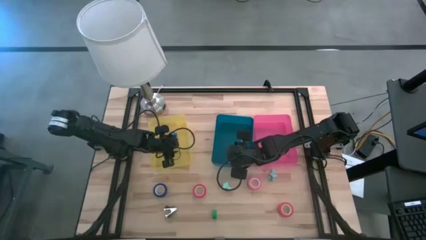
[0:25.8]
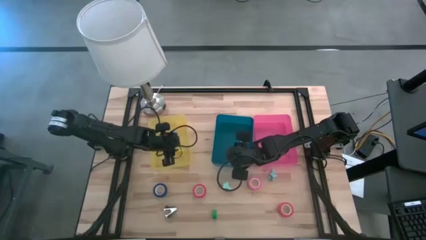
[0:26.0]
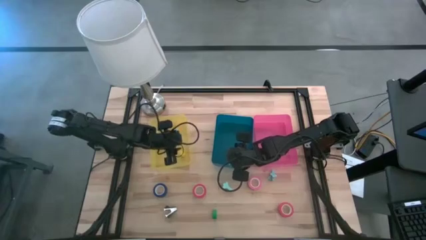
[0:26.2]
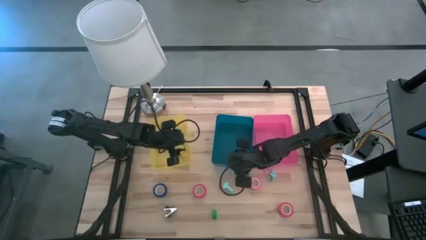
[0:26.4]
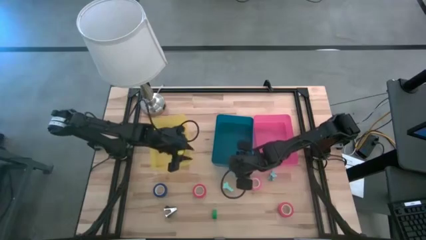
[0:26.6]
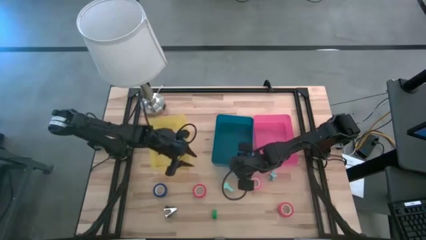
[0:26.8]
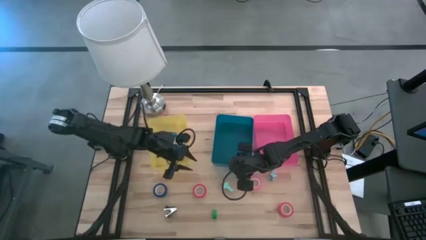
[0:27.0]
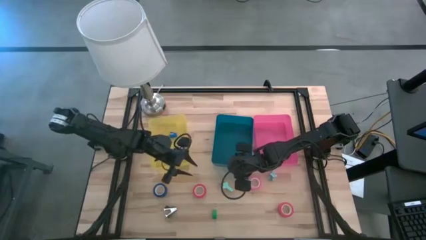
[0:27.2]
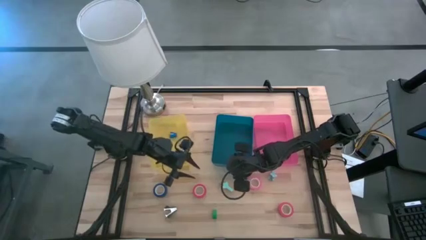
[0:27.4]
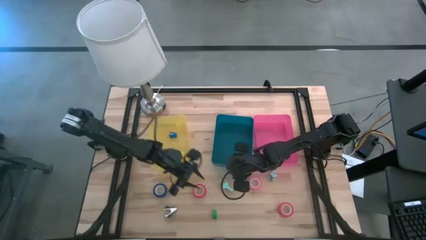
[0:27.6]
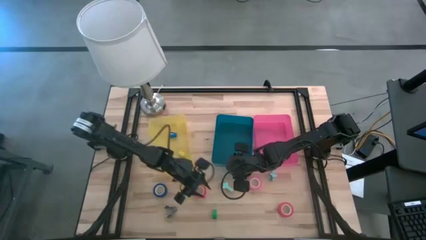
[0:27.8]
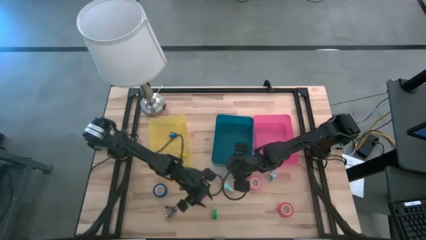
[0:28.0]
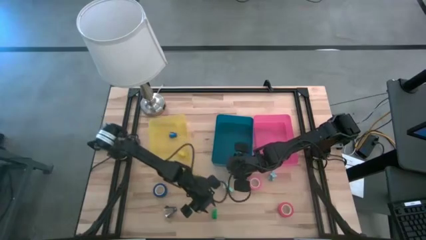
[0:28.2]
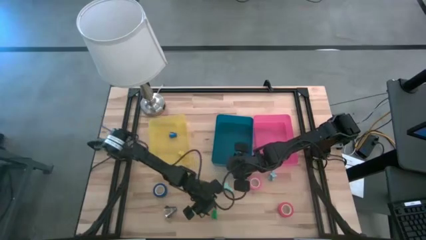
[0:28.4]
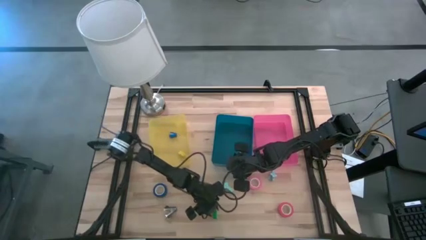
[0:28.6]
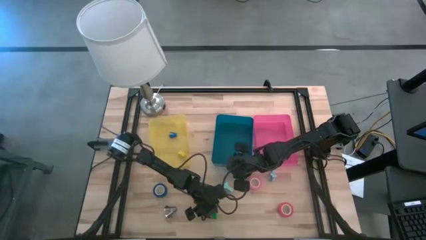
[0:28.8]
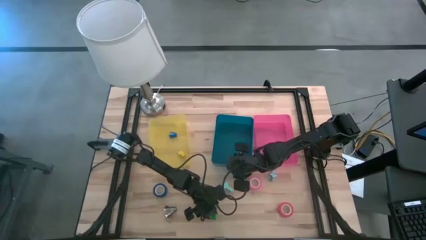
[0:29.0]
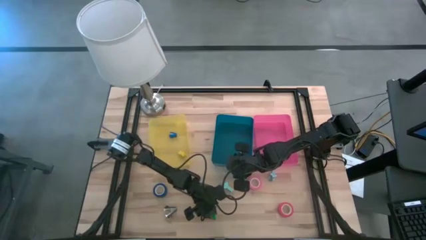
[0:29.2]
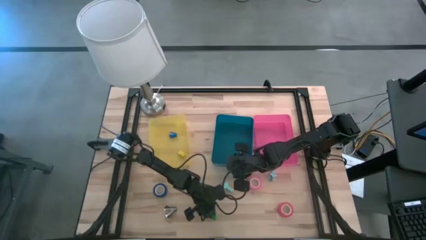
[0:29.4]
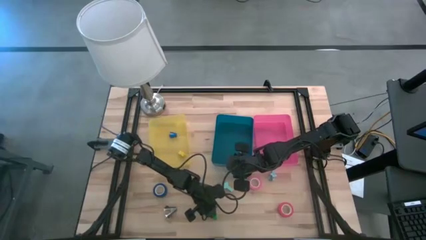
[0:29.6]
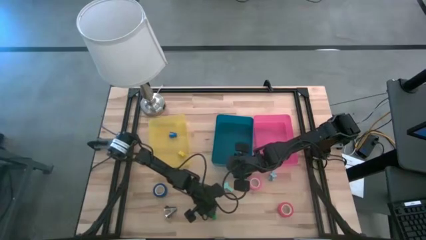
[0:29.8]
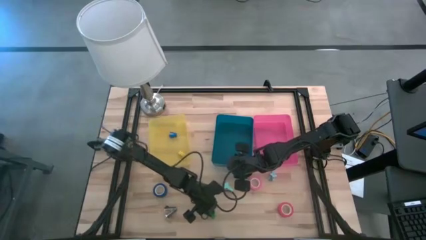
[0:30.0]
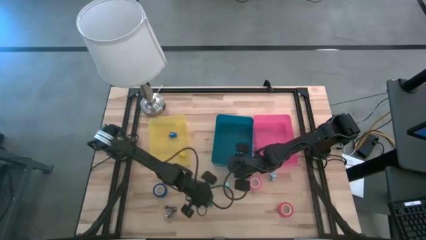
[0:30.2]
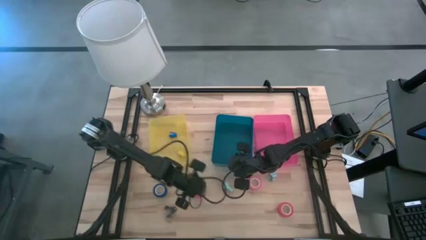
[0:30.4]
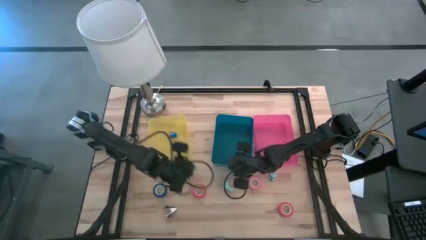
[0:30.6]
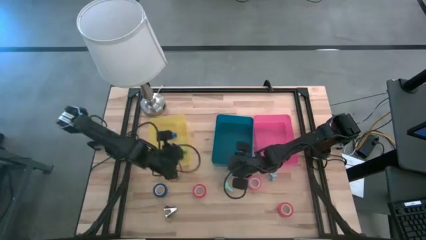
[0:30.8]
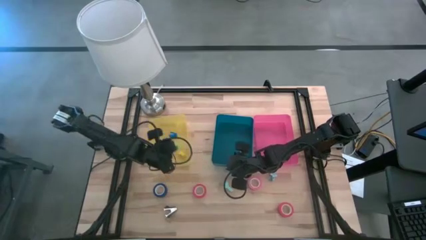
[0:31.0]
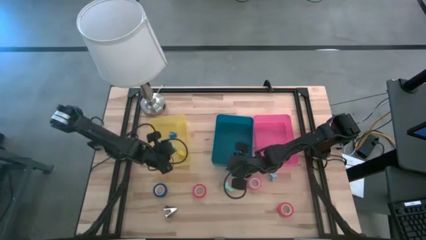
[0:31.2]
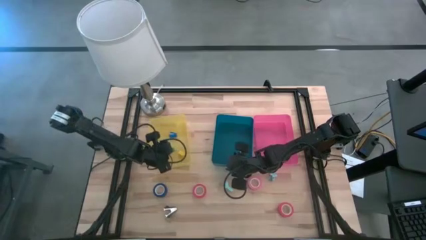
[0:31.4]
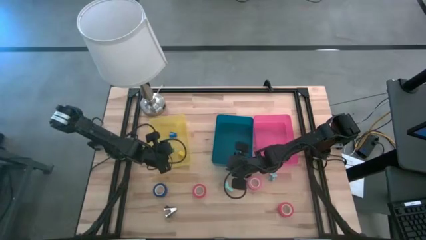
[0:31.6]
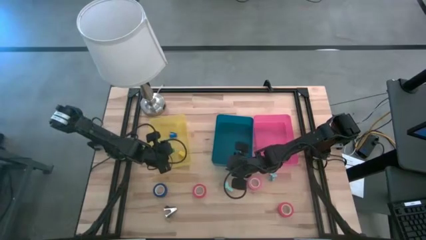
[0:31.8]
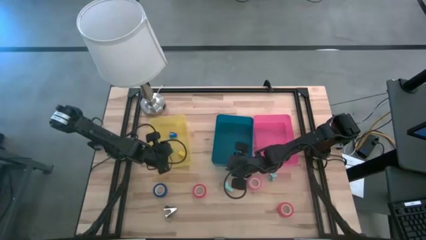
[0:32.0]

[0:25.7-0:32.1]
Task: Pick and place Stapler, Stapler remover, tape
Put the green stapler into the yellow bin

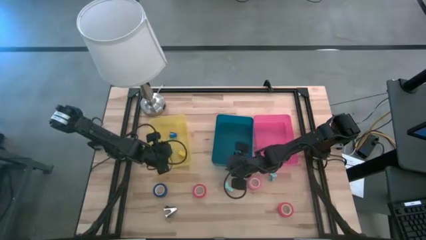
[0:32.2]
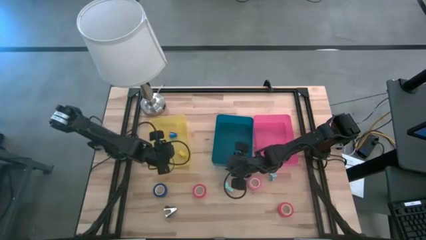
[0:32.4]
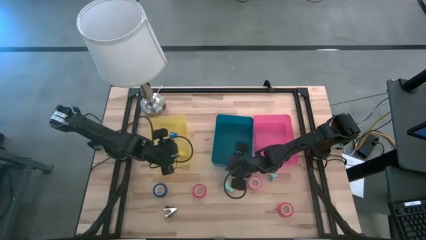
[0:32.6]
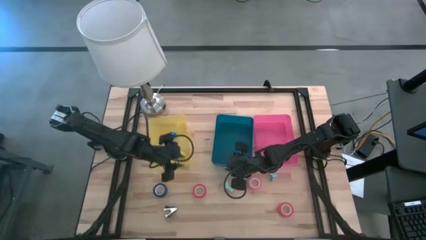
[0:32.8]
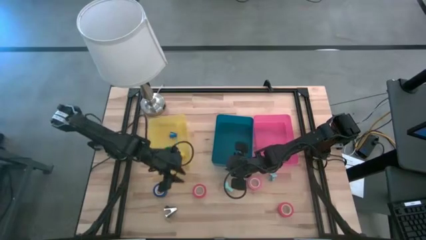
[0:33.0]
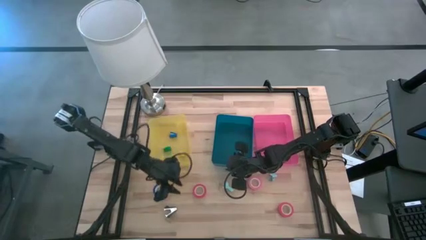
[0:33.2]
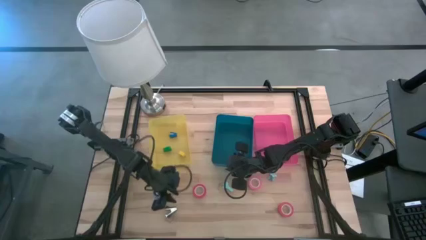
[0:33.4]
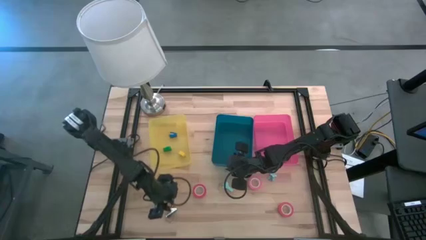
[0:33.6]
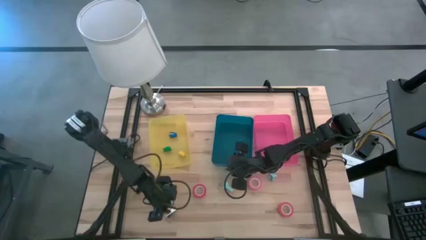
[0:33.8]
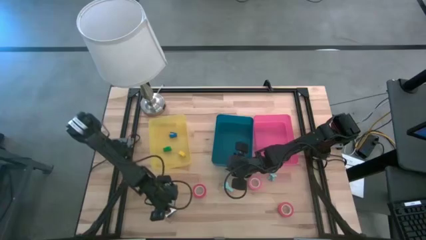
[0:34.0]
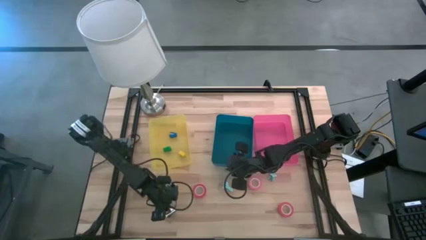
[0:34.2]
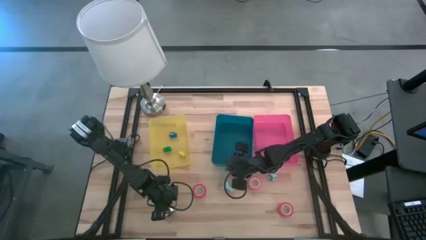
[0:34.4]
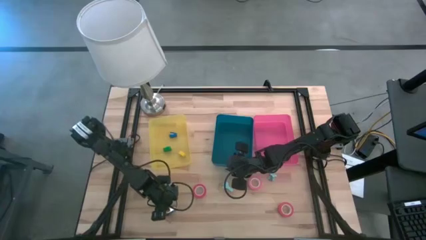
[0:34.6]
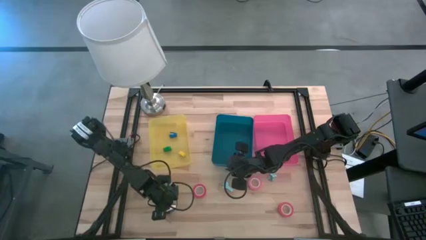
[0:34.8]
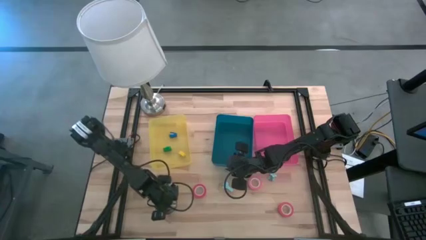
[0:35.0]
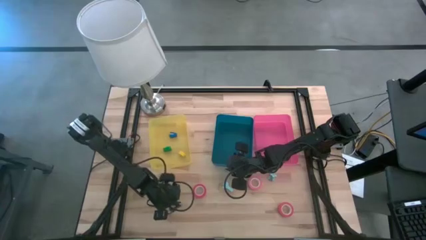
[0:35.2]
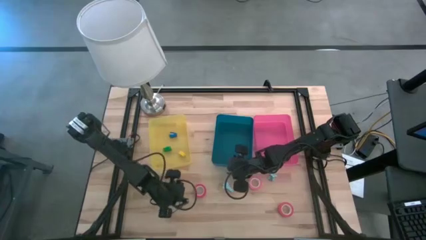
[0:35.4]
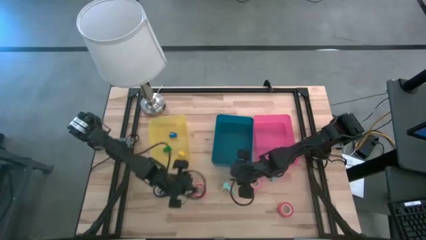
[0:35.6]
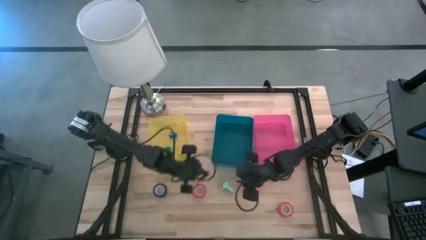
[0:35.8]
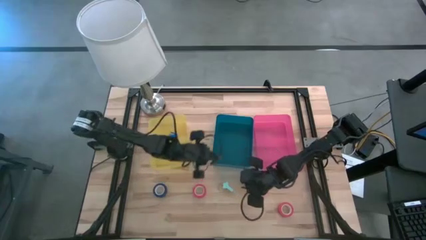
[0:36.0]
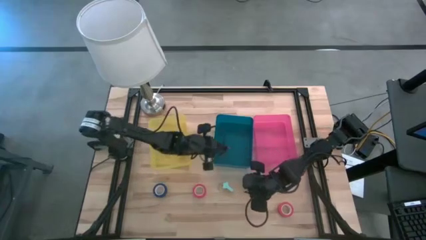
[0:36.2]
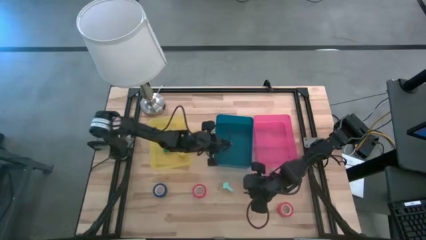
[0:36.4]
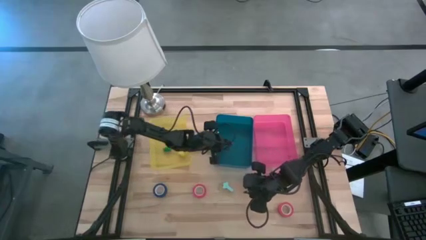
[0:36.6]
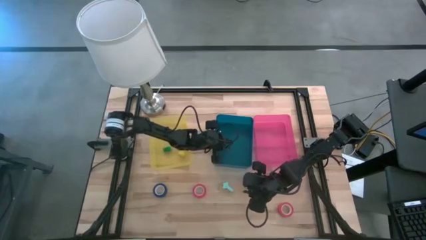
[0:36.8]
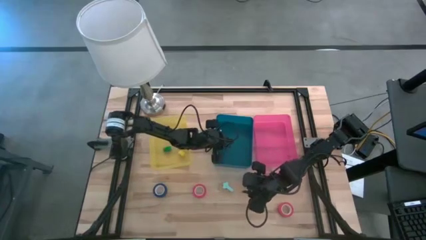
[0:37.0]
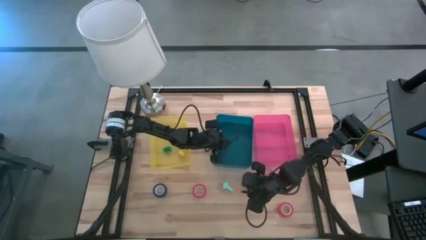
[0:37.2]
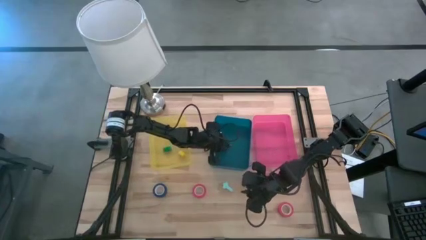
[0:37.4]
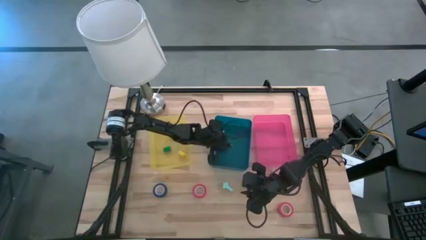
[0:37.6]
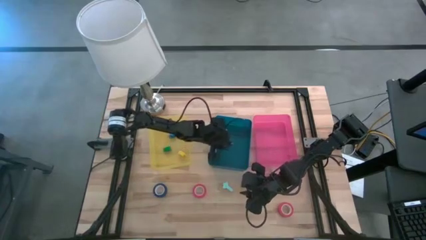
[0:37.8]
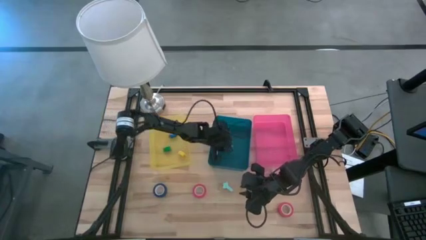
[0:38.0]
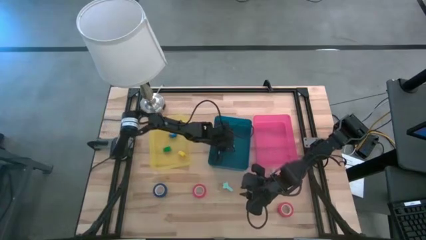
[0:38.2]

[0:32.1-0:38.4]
Put the black staple remover into the blue bin

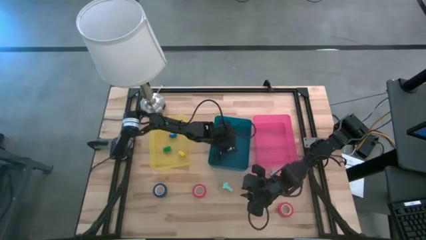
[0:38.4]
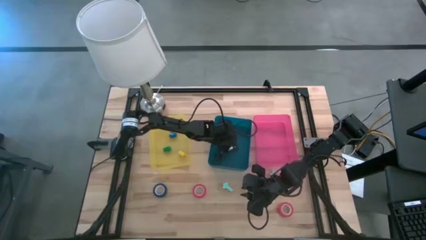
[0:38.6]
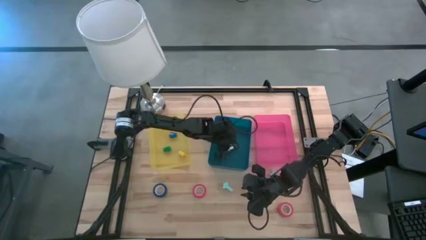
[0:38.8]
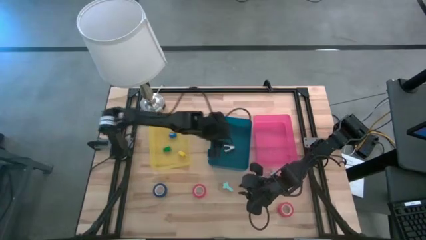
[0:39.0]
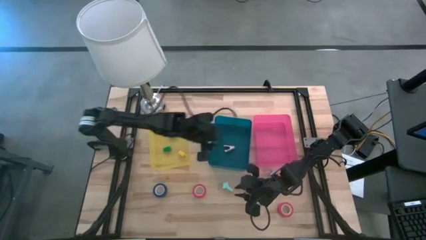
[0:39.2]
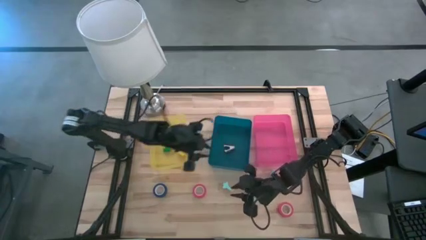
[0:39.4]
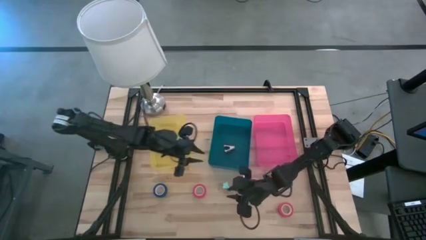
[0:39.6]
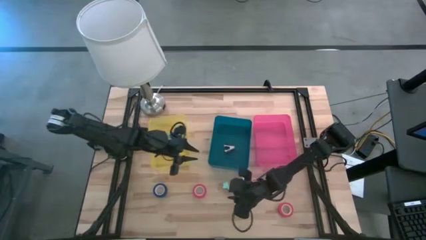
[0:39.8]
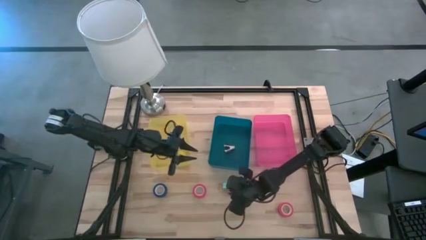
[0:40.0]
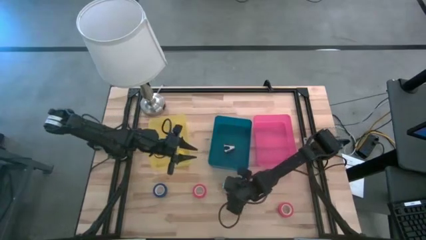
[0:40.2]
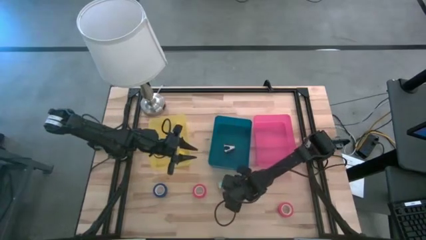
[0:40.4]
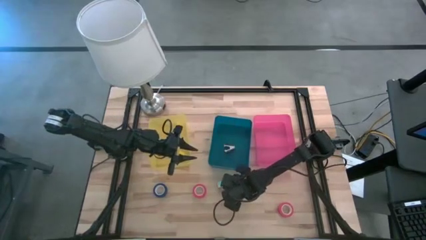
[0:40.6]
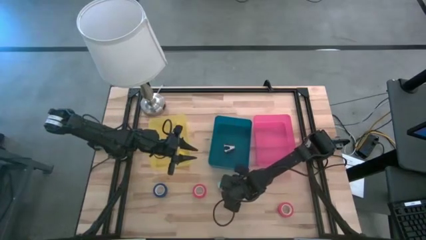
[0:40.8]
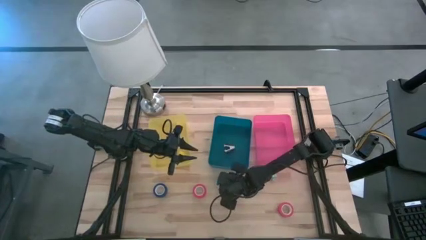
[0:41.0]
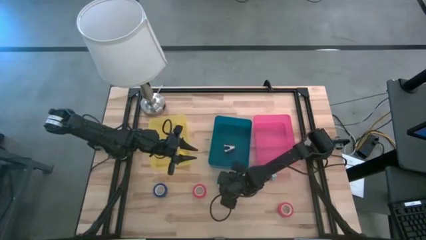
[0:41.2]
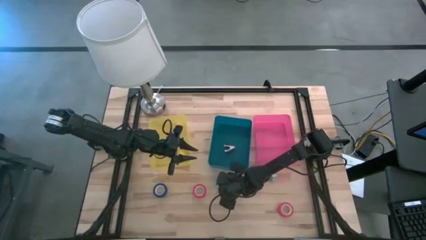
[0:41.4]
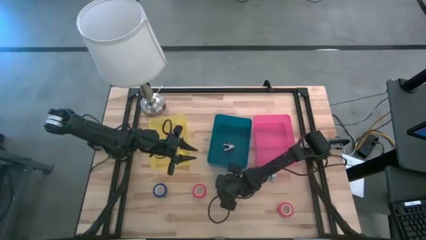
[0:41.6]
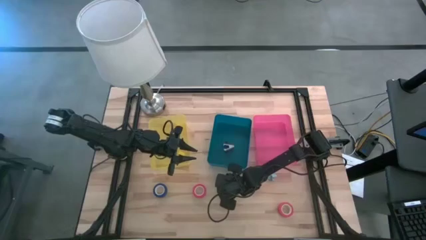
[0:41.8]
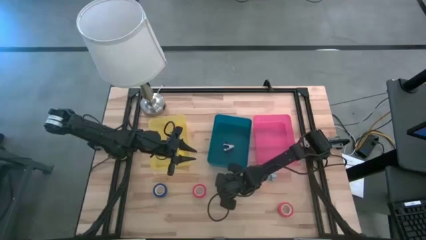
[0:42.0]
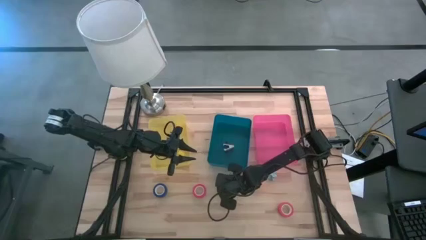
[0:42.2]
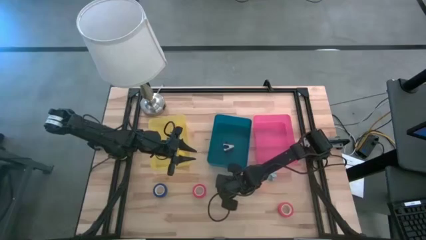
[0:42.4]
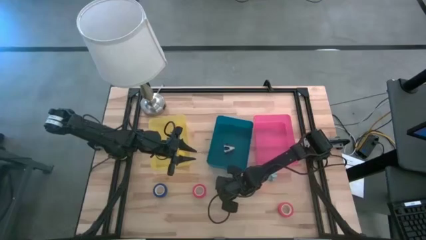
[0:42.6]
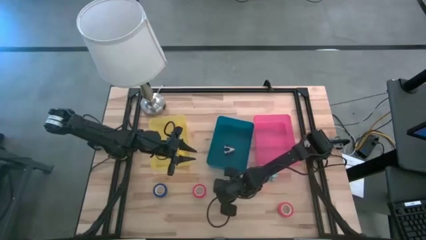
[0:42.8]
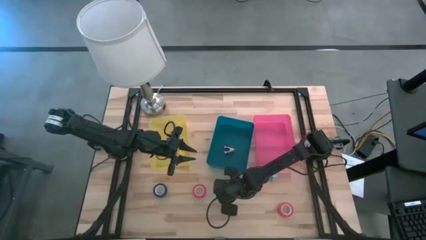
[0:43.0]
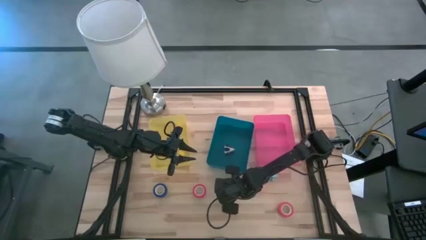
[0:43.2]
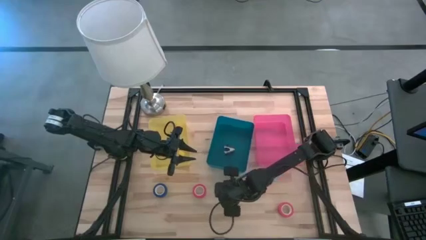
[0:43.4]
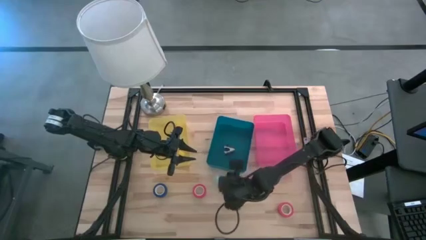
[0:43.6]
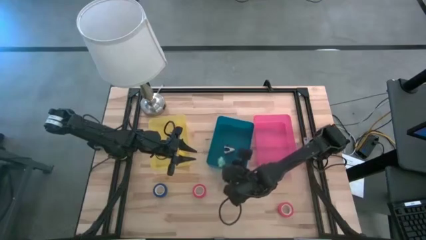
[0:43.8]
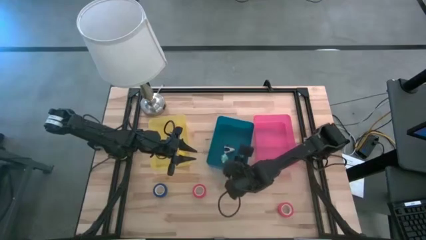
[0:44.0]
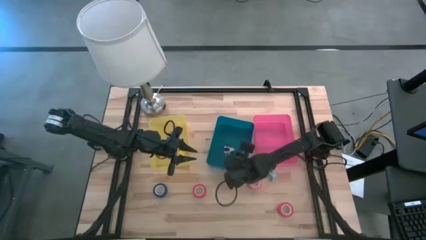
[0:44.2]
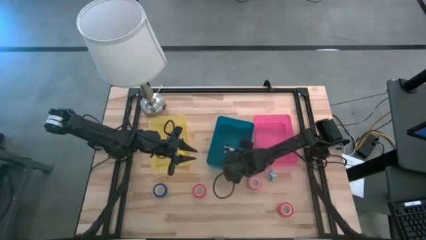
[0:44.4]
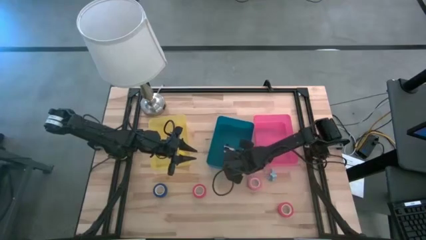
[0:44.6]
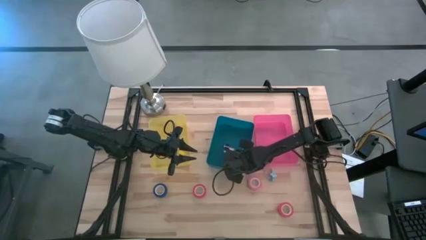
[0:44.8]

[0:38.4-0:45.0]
Put the left light blue staple remover into the blue bin
